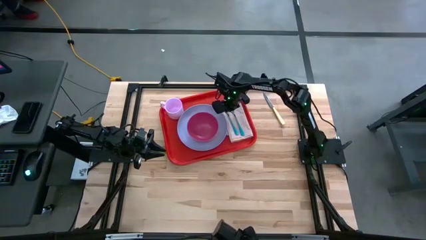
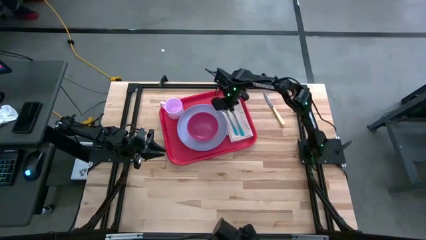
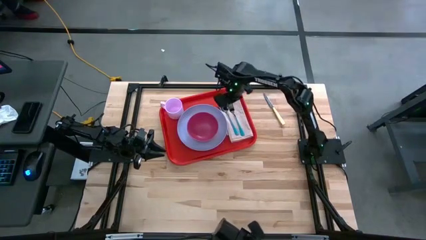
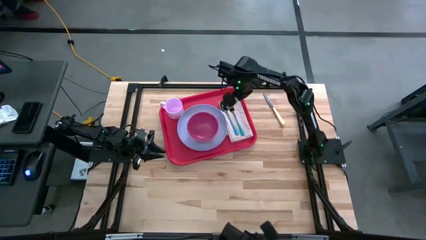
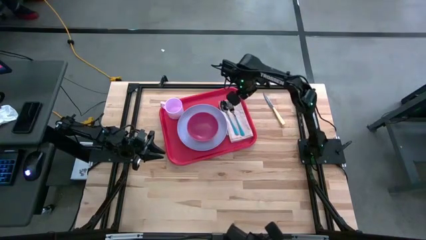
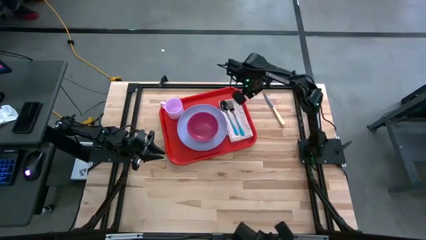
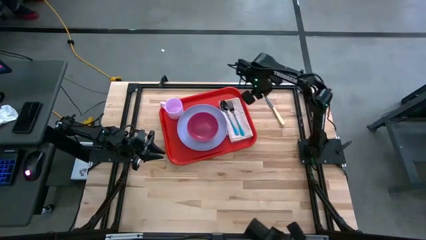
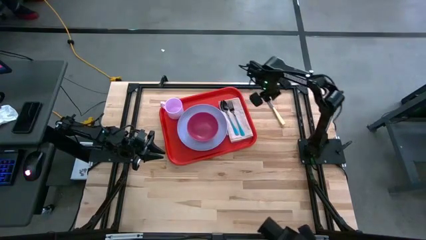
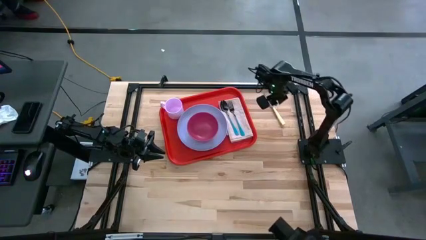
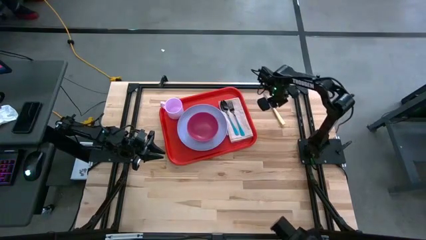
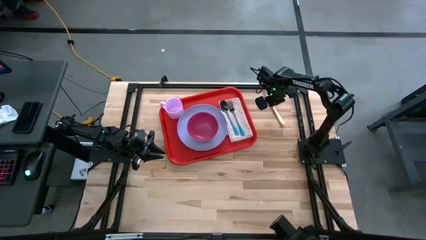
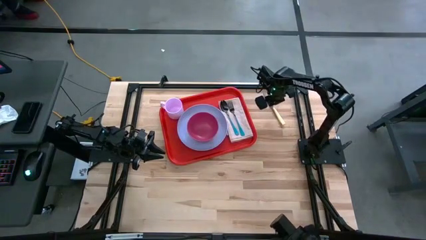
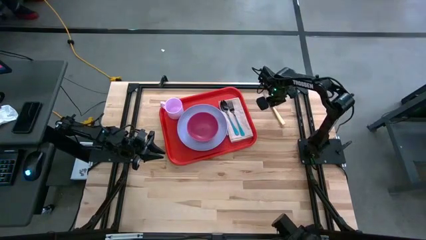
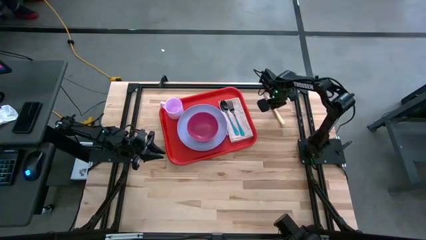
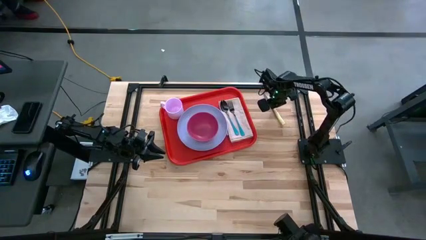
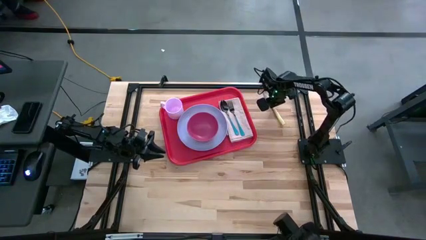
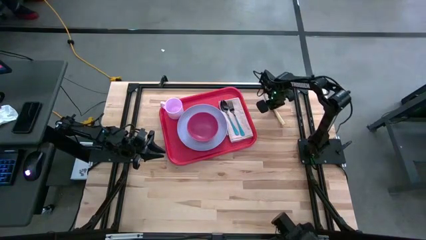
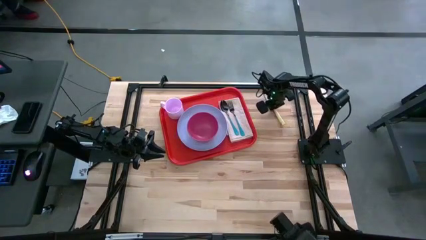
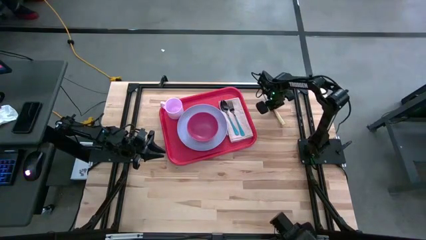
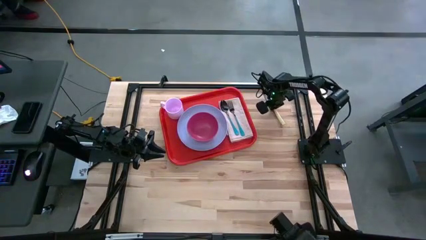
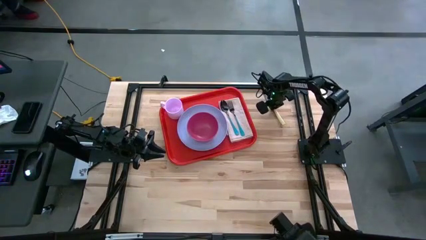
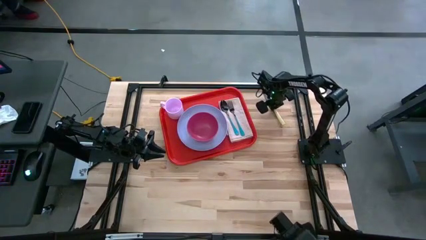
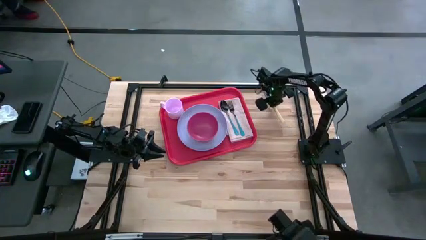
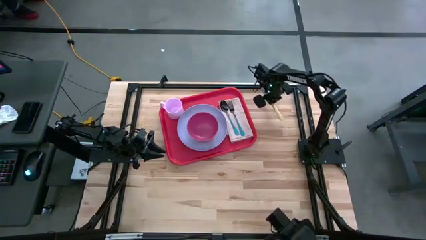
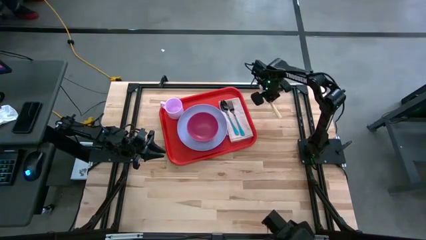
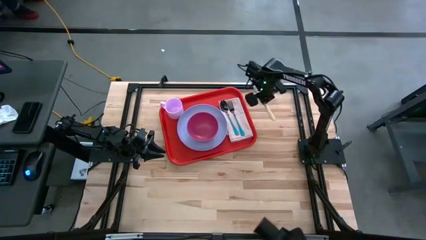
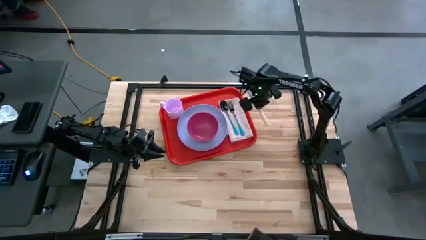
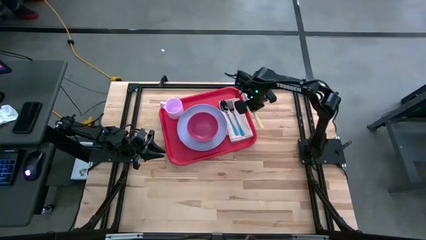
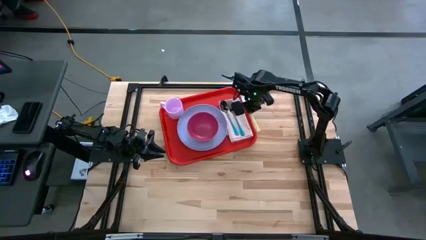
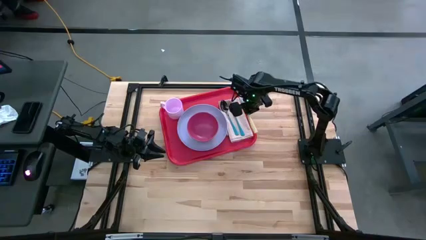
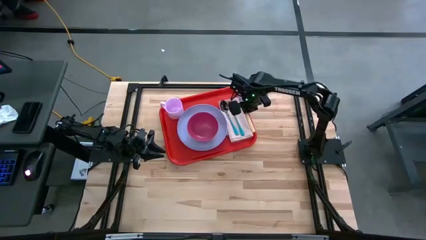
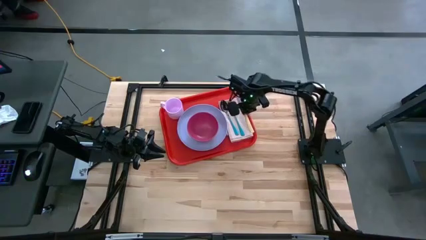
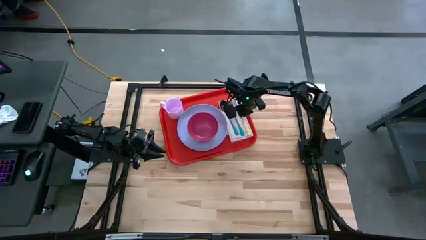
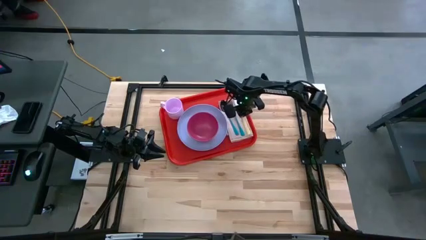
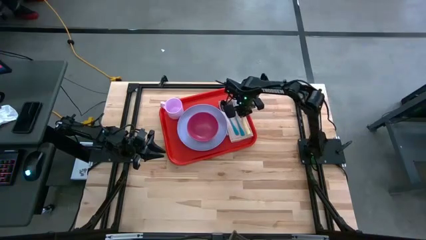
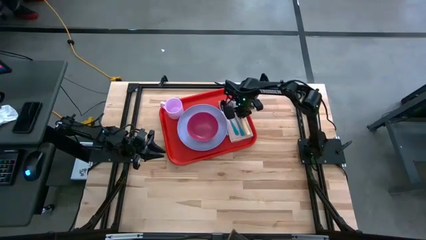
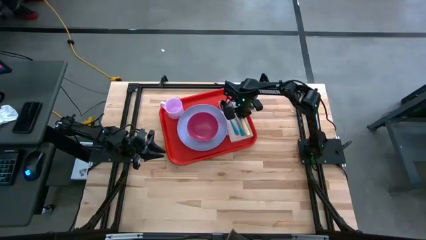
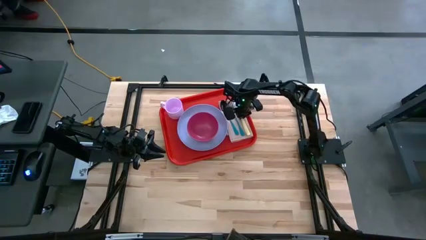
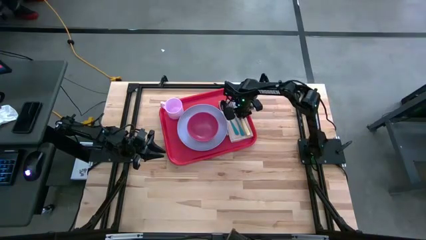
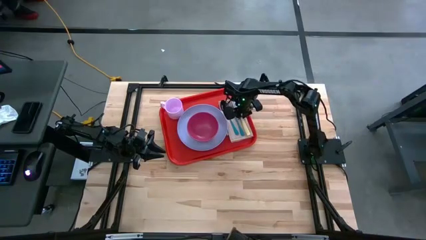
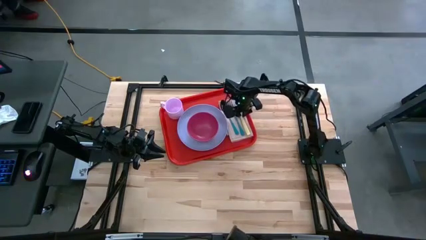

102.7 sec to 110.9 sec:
Task: Set up tray
Put the yellow knife on the brown napkin to the right of the blue fork

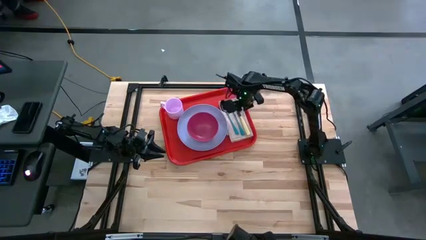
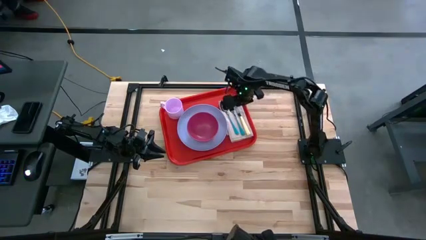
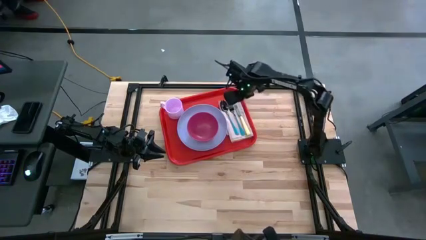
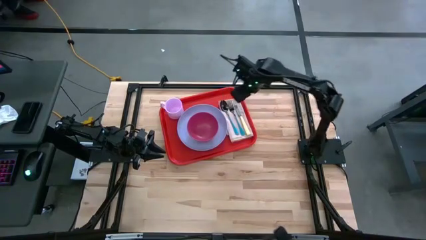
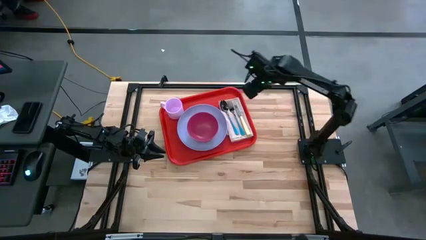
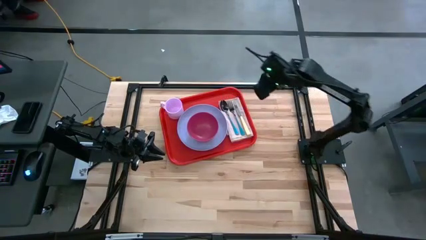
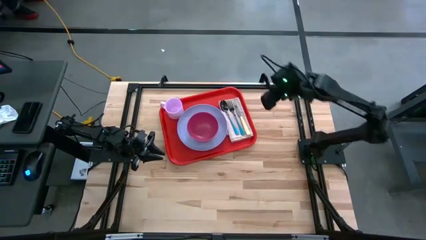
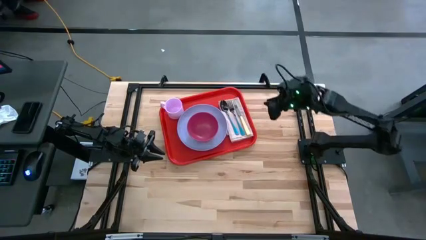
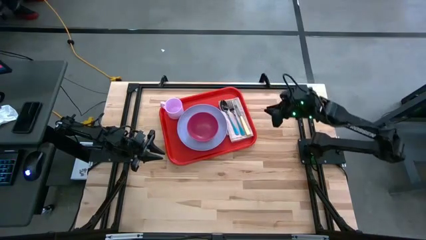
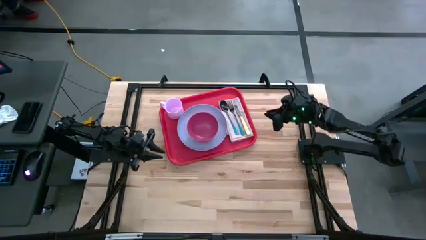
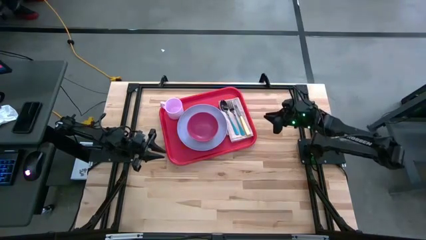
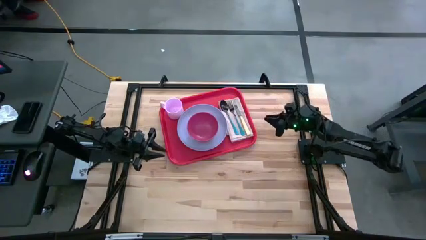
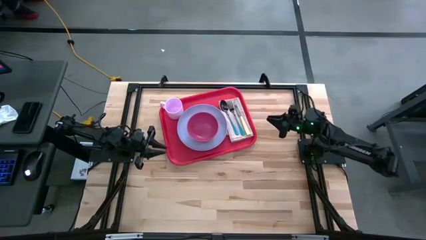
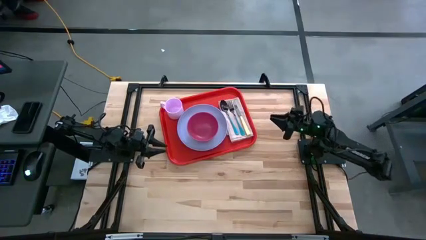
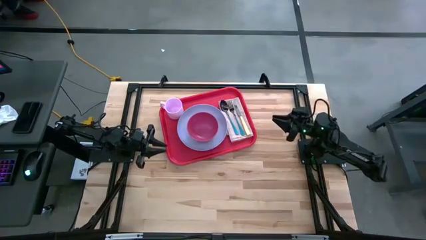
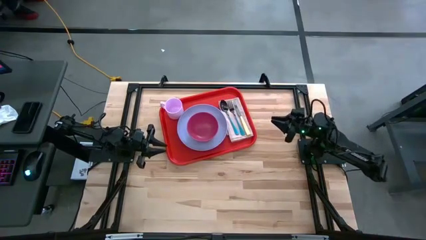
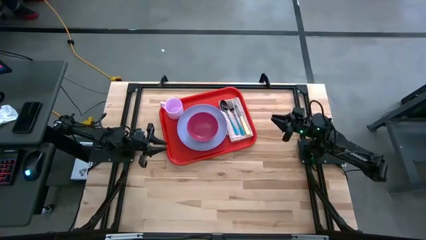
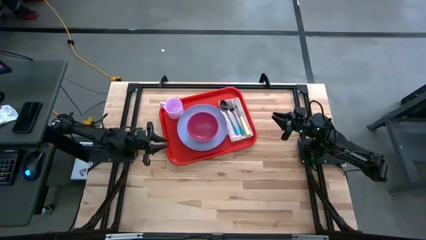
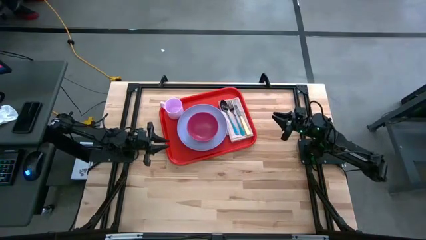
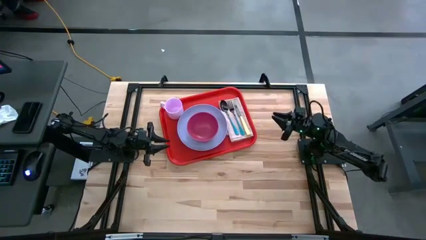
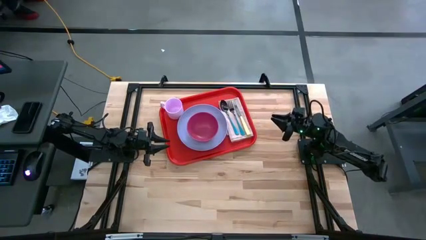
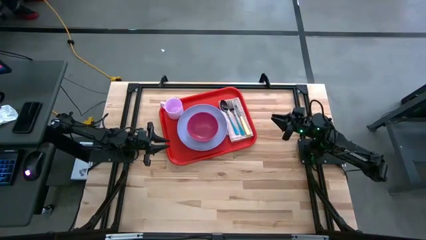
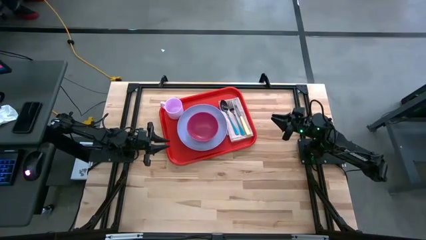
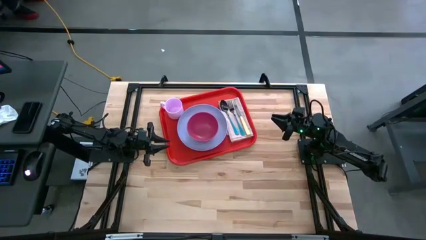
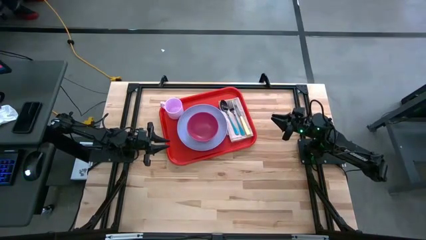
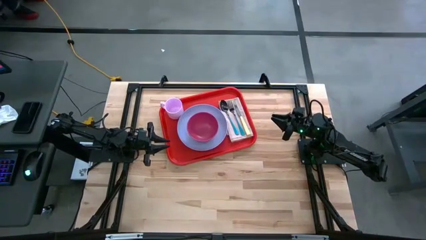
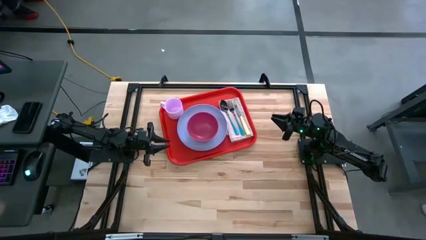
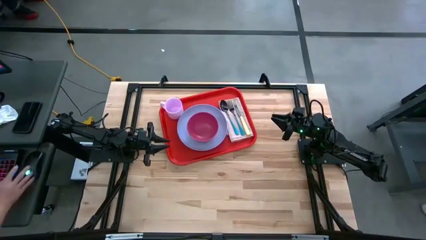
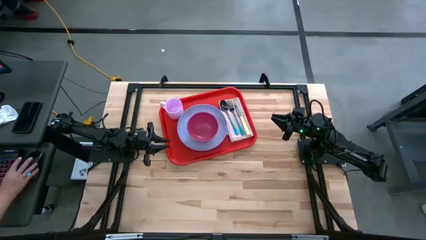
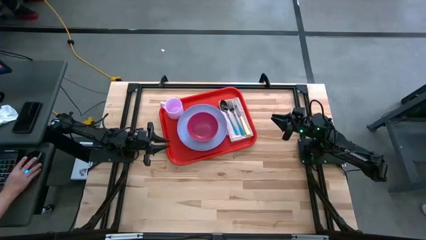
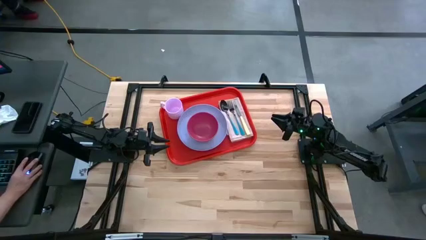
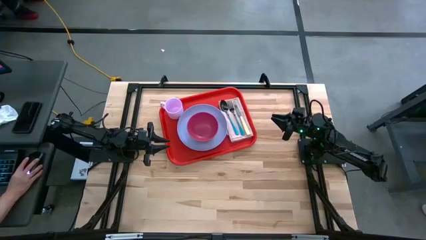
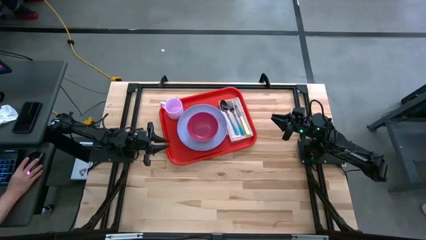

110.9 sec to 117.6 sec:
Return to Home Position

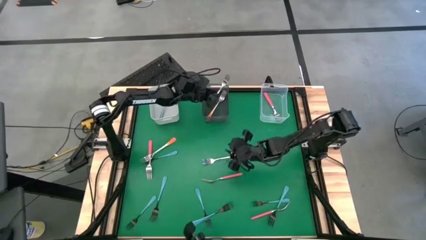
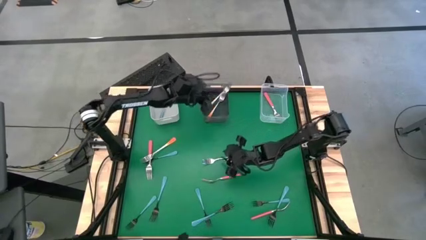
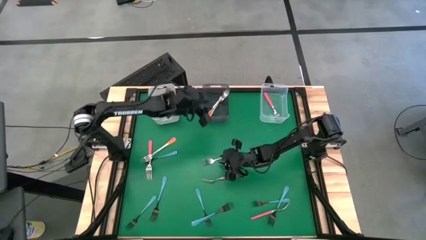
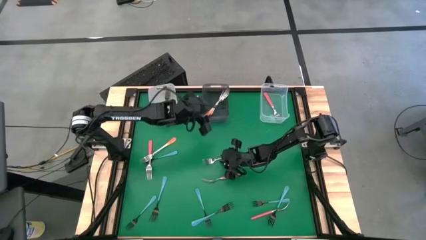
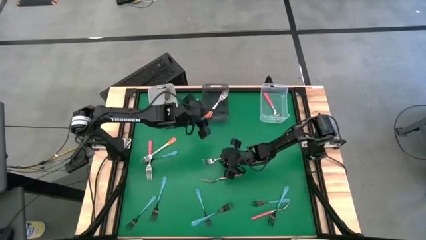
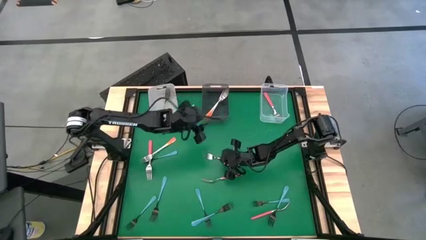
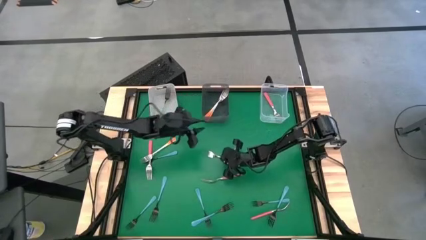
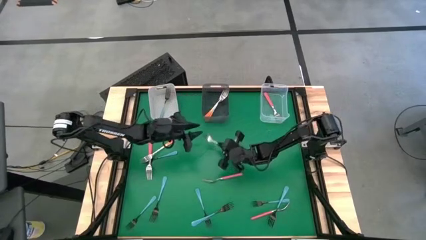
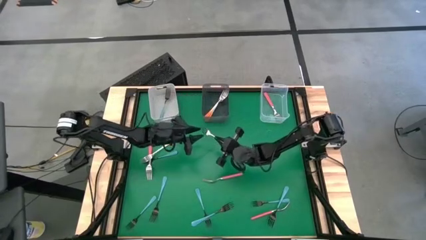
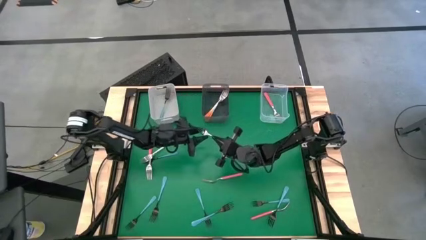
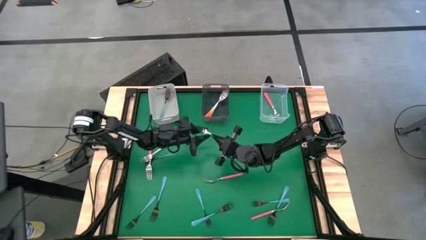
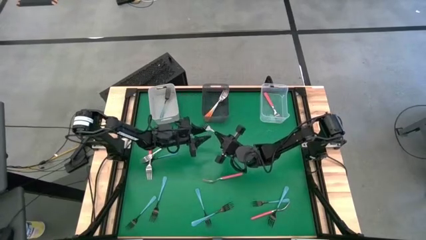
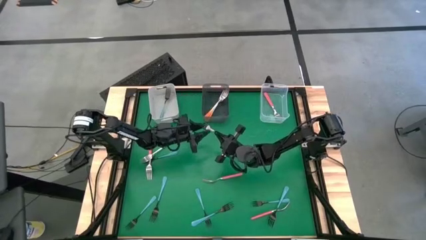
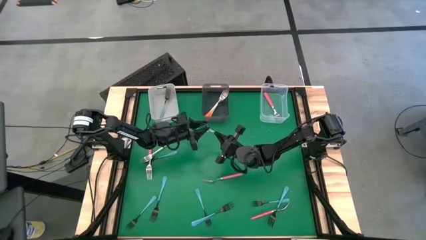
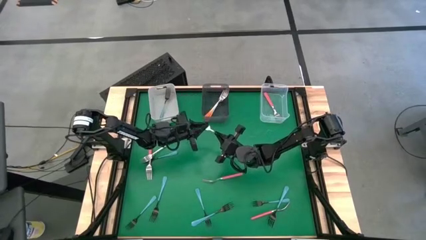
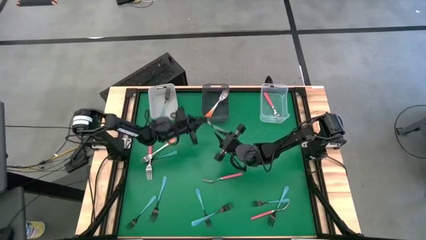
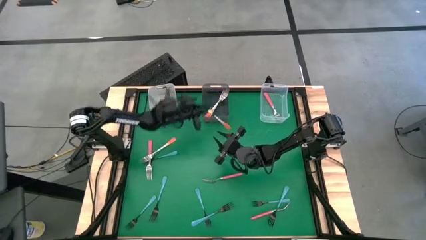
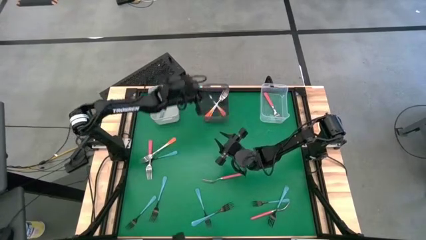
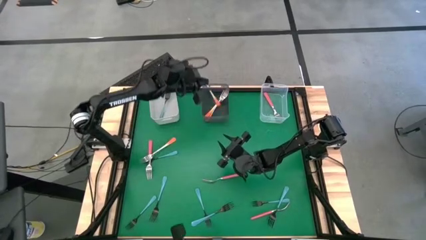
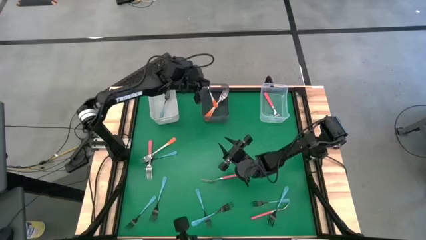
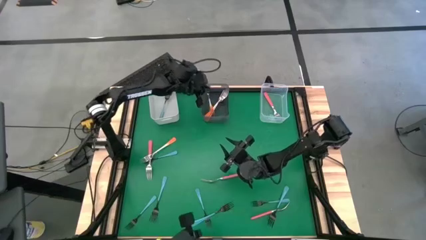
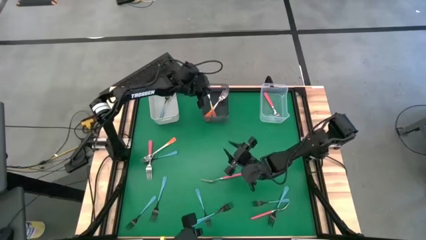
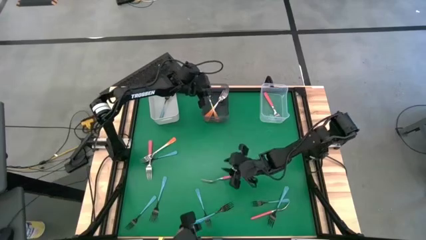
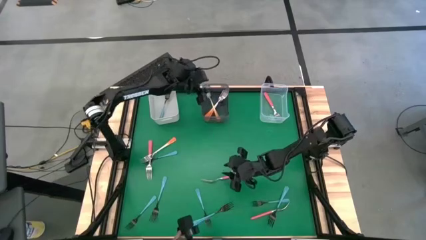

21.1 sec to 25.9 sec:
Task: Sort silverware by color (type)
Put the orange fork into the black bin
